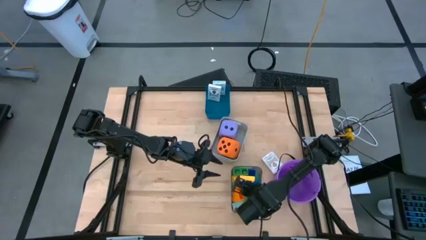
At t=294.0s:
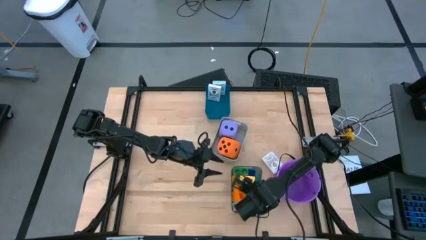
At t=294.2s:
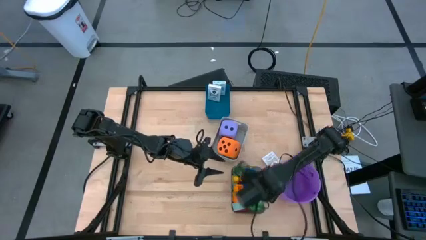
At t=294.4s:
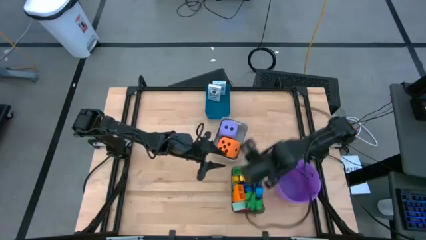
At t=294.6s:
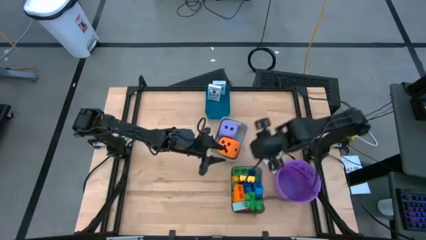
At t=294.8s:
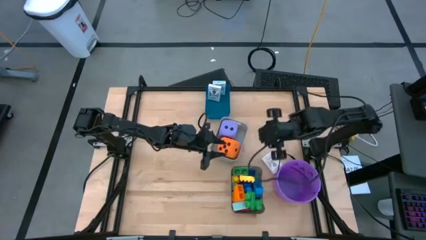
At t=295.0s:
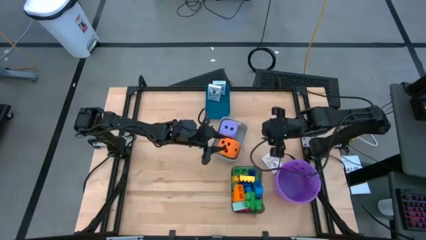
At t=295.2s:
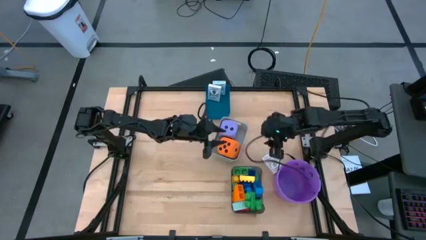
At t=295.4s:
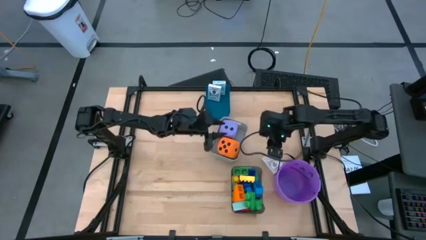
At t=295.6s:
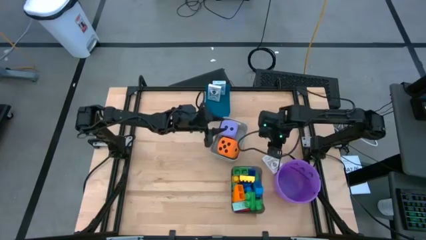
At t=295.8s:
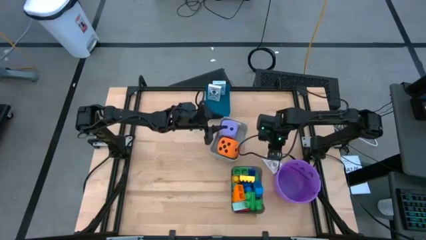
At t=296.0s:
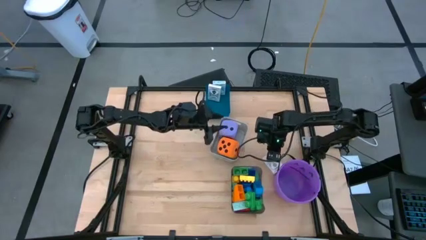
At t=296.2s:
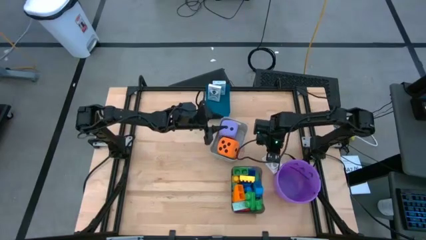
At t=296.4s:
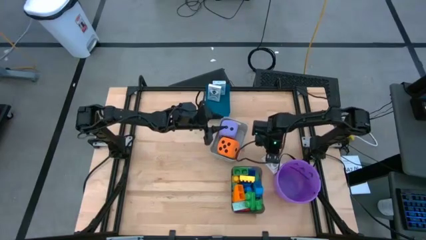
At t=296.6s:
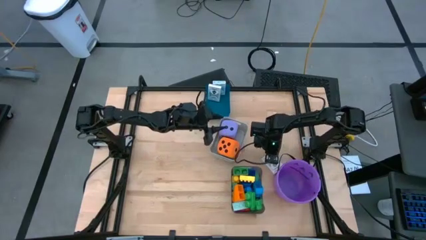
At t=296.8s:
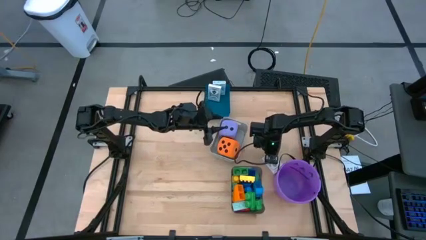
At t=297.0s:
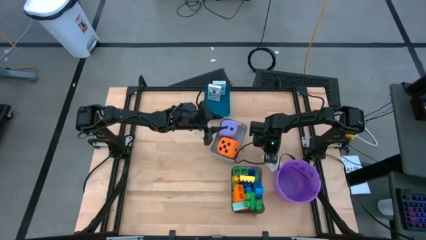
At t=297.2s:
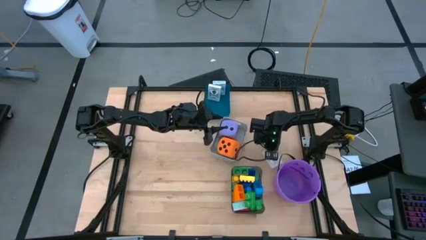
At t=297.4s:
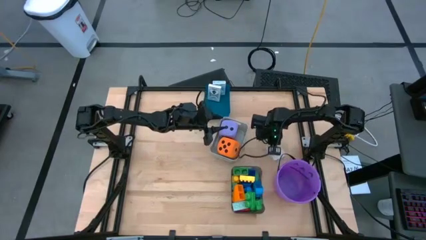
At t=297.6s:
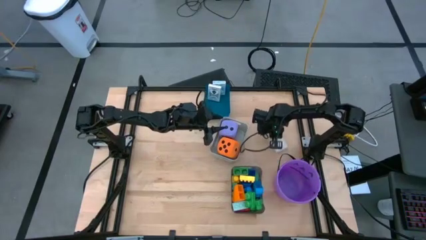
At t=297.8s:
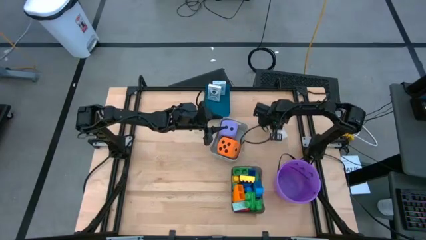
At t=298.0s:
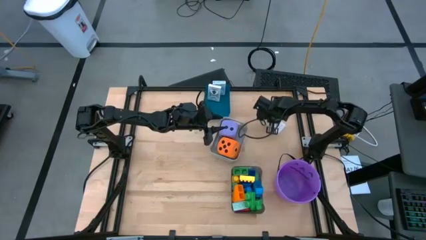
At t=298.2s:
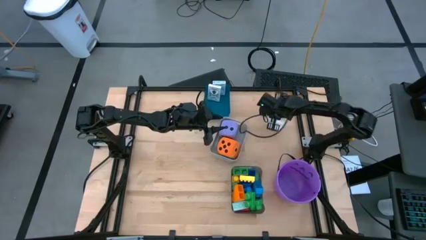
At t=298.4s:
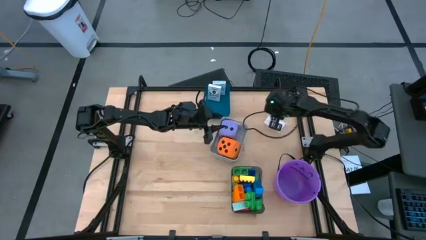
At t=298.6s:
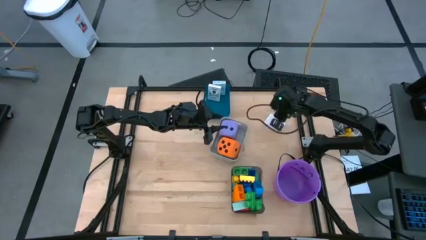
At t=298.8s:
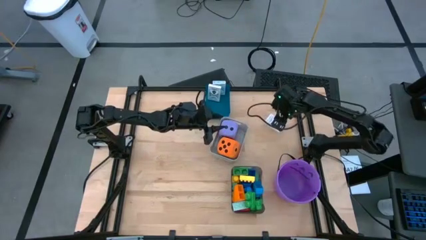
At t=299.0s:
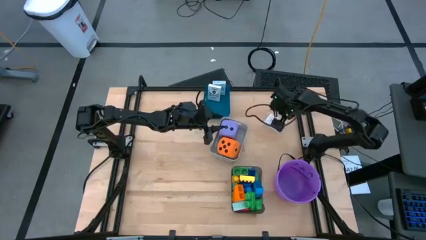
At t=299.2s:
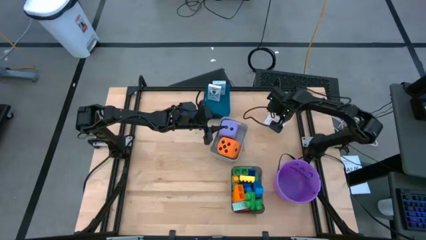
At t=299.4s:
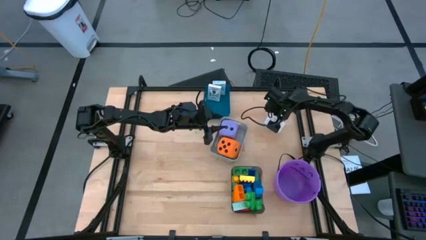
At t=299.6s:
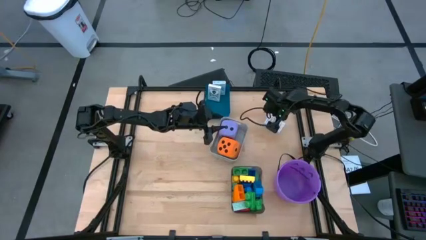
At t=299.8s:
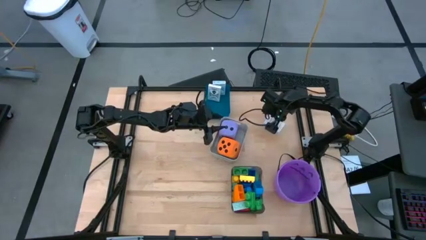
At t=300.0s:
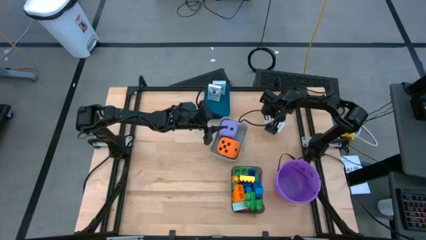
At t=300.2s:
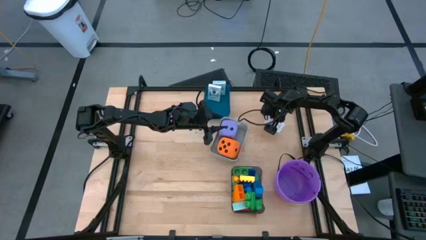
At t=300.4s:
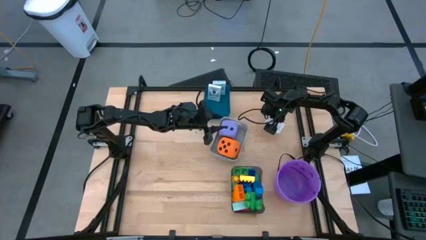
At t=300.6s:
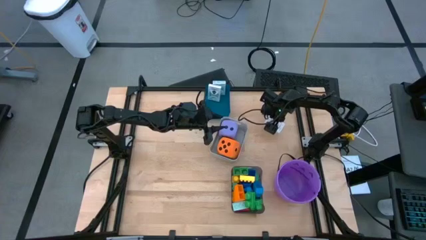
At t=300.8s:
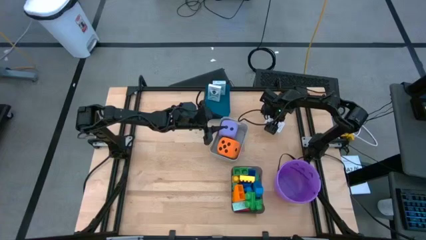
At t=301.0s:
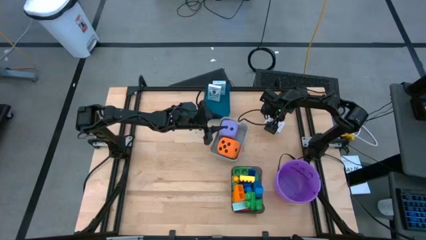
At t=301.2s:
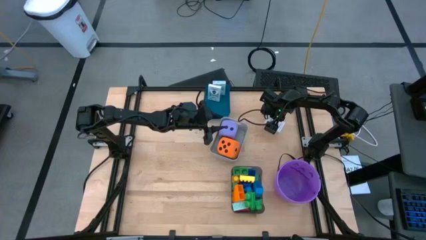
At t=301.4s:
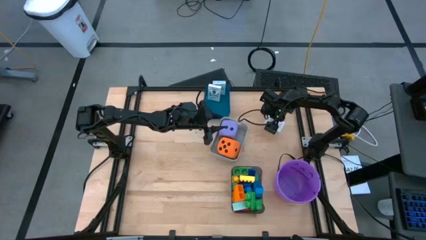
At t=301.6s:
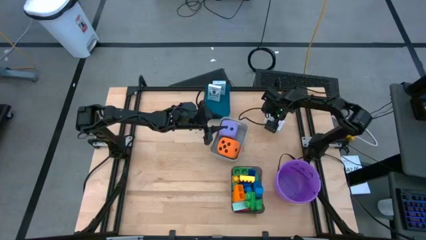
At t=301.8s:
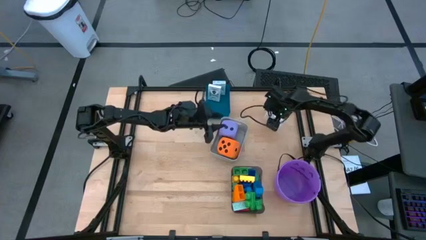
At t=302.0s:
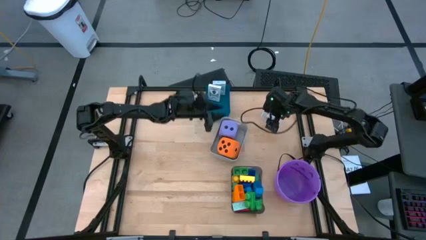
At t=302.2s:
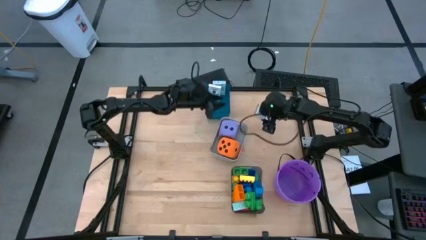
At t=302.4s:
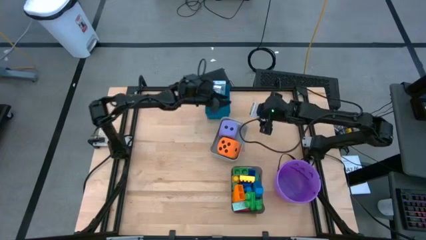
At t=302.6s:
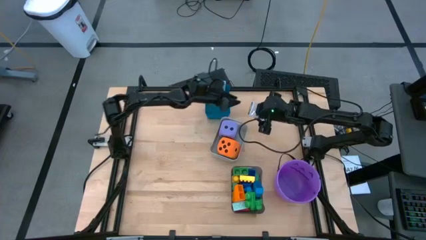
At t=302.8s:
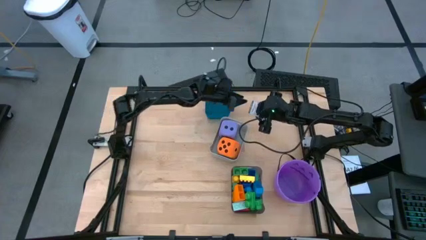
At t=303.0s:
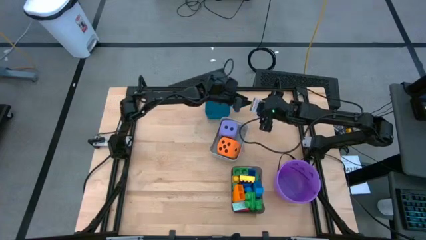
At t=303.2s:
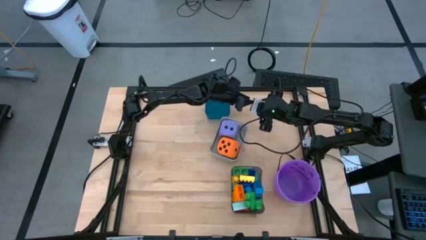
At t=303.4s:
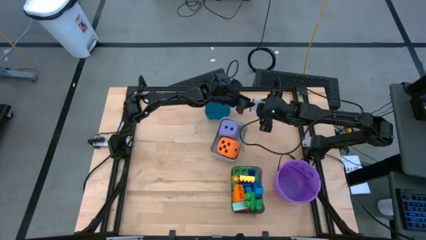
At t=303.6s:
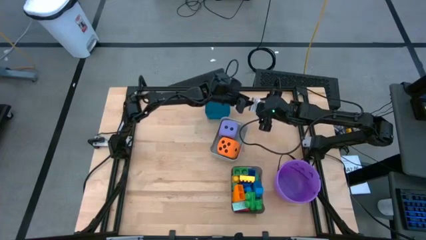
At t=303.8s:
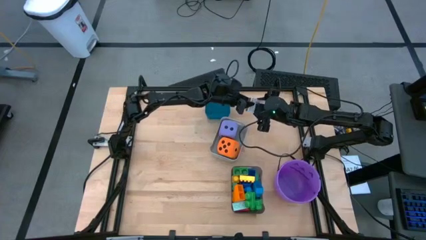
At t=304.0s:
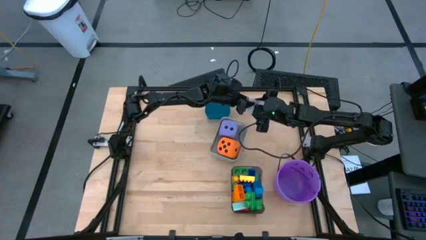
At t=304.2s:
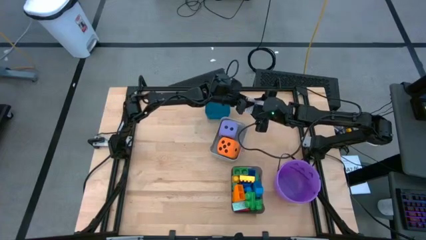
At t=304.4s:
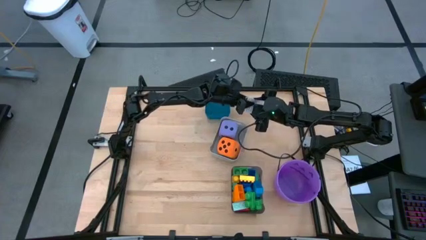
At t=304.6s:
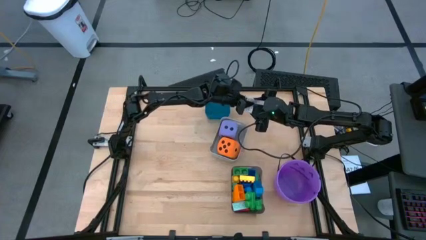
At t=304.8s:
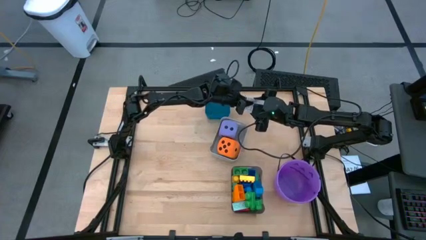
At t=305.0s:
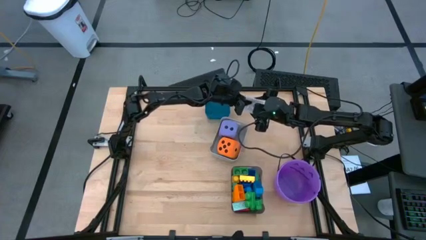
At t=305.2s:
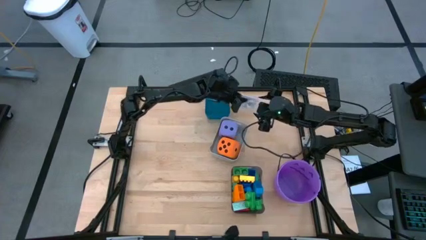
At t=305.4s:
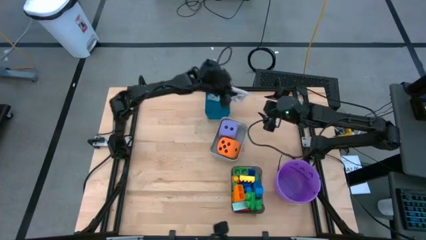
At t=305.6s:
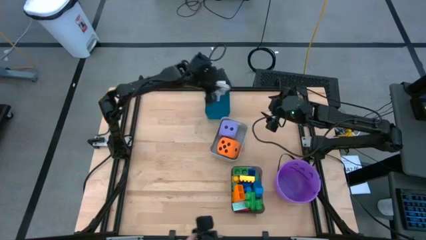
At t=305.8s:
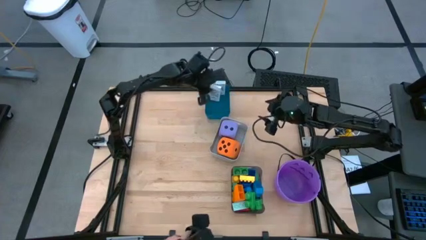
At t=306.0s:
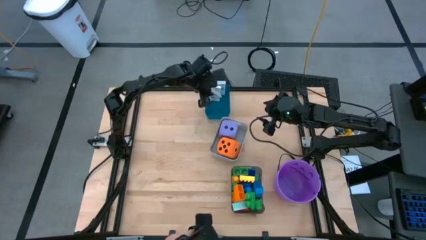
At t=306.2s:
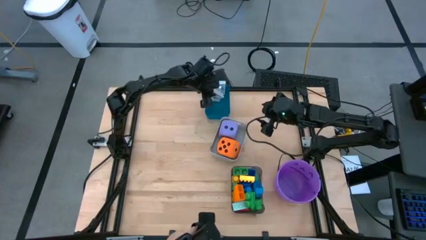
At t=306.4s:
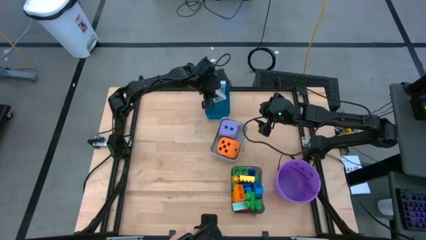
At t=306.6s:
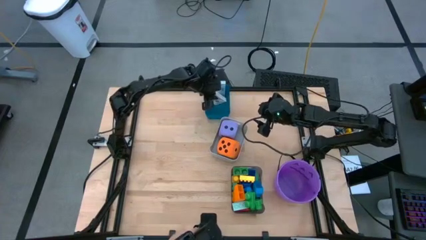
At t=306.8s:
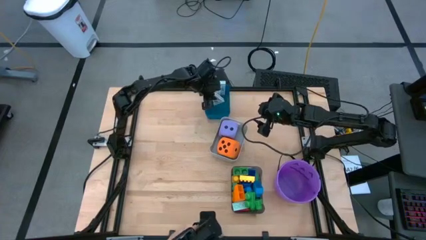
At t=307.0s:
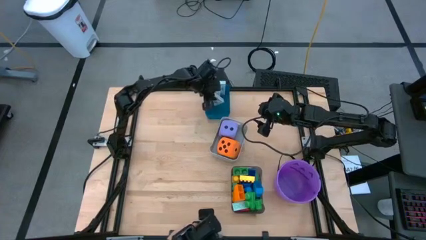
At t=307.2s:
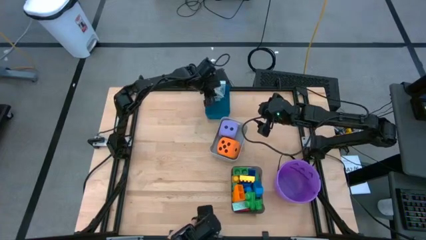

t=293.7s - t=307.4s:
Task: Pick & Place Toys
Put the brown deck of cards into the blue bin

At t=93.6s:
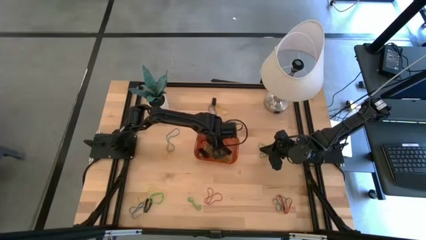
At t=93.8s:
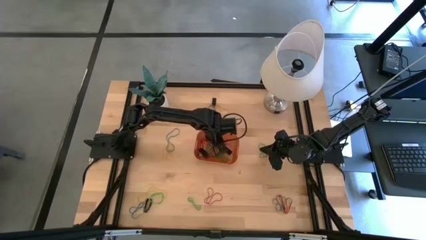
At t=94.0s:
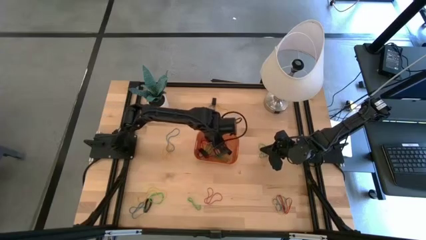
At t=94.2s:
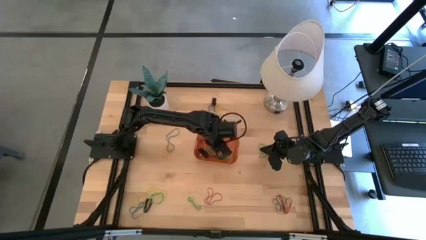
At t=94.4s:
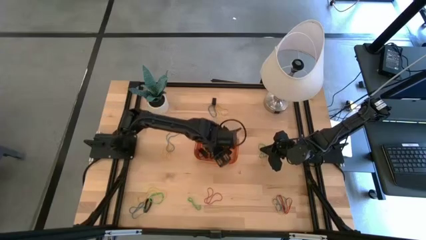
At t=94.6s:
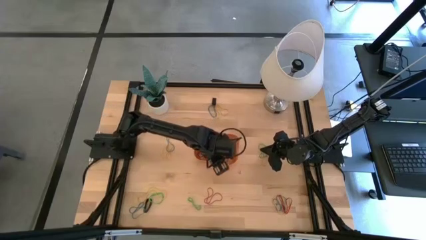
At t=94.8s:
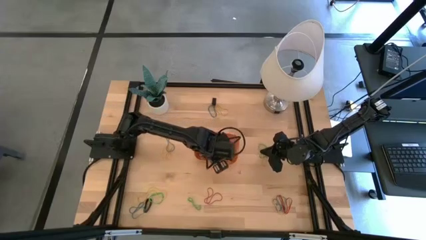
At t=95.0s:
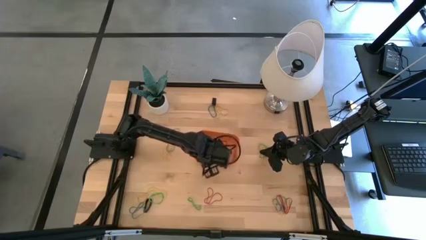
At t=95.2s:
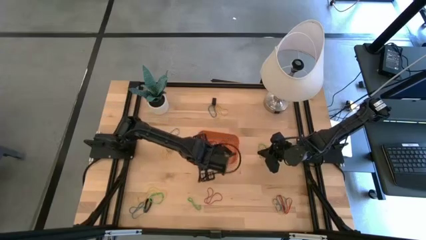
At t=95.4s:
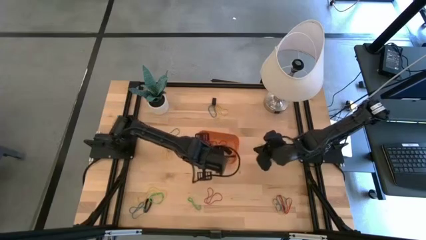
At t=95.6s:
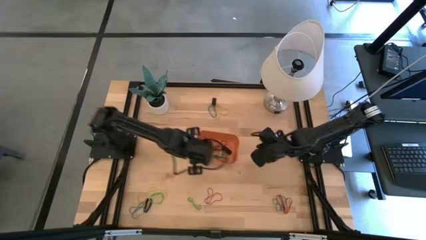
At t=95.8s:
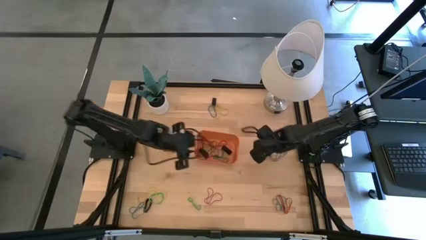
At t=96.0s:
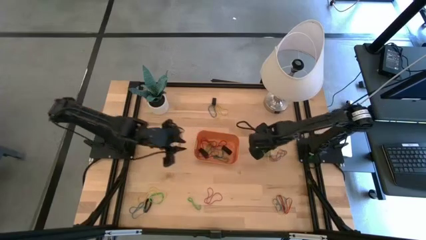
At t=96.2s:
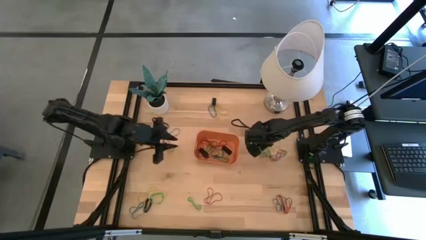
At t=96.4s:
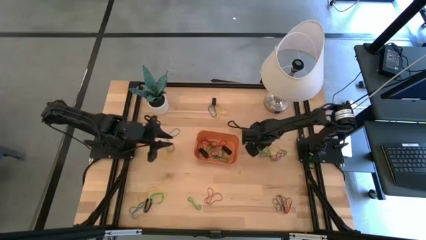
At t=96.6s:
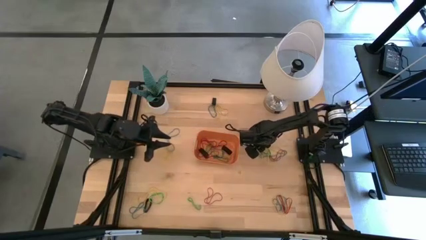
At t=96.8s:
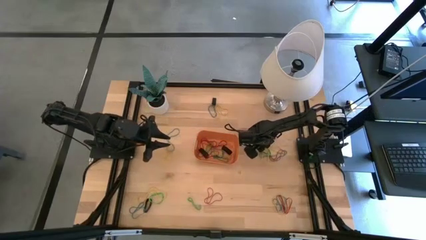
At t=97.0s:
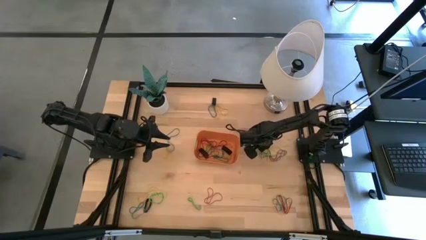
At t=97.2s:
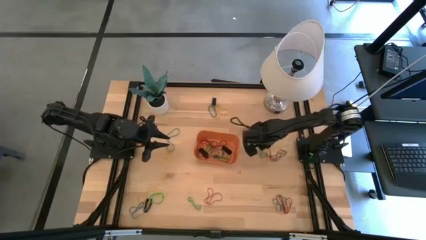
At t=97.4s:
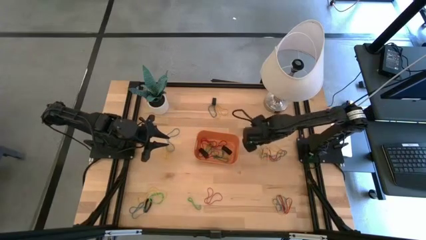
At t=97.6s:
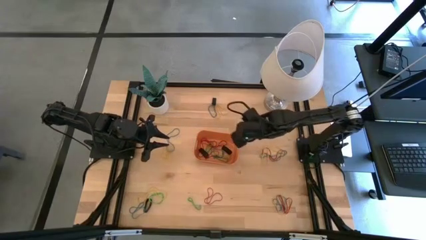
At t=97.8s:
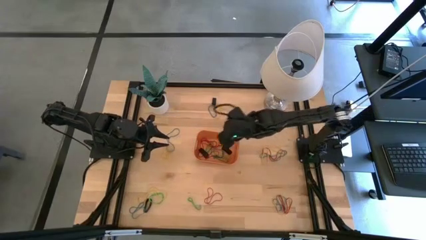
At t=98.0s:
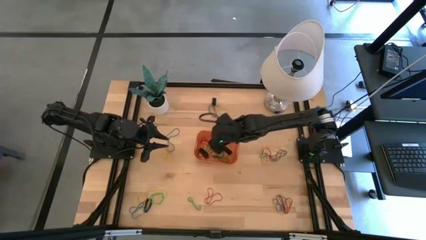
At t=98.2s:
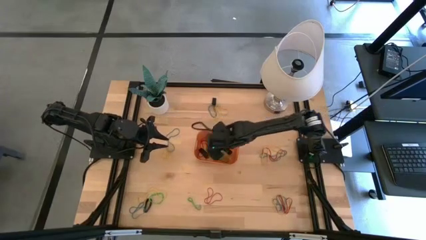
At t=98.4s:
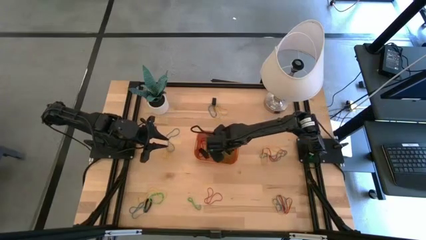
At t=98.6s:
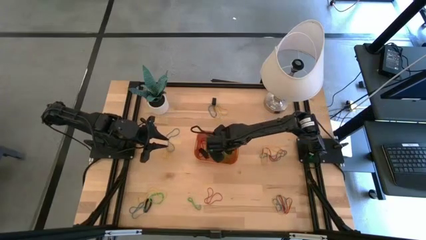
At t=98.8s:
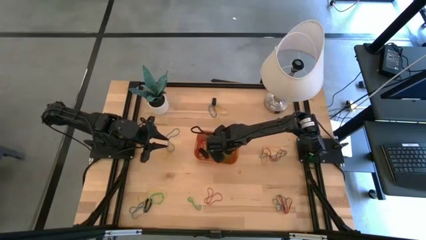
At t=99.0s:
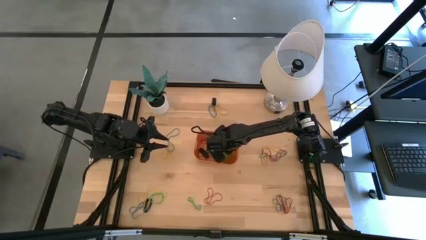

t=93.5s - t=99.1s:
Task: Pick and place rubber bands into bin
Put the green rubber band into the orange bin
